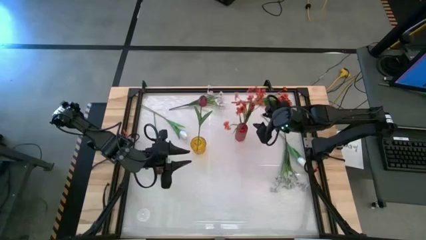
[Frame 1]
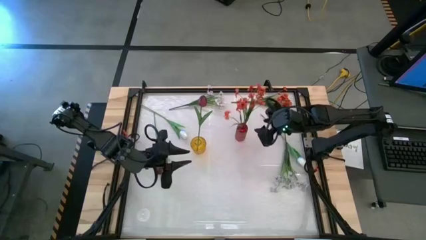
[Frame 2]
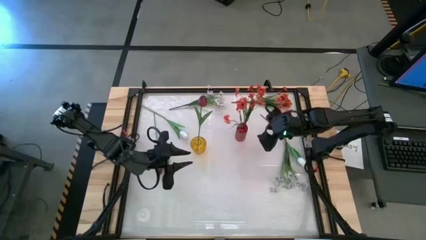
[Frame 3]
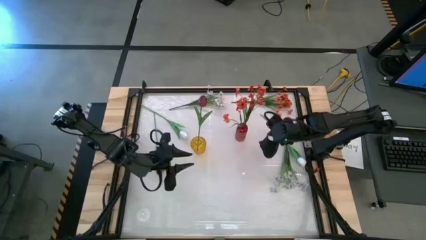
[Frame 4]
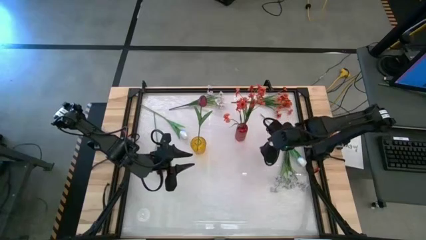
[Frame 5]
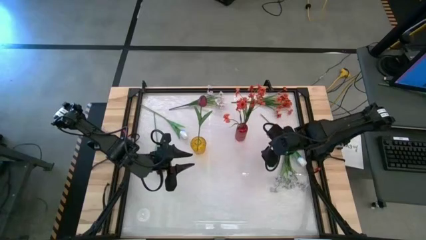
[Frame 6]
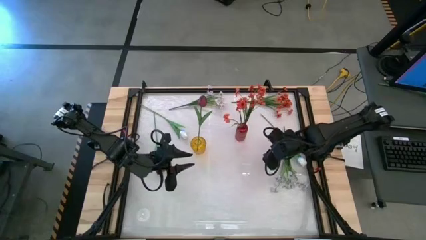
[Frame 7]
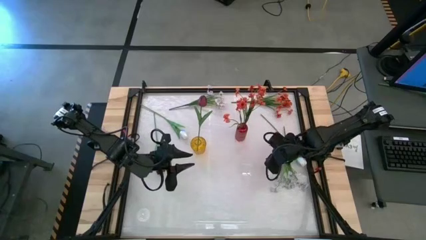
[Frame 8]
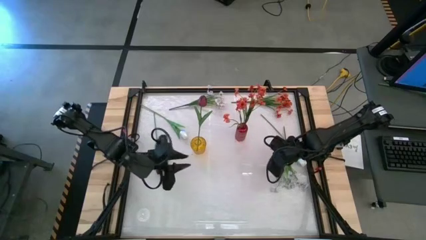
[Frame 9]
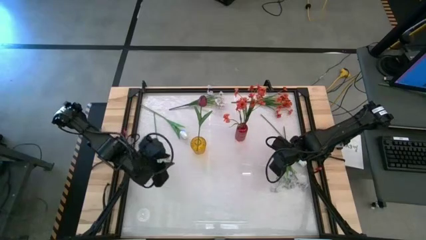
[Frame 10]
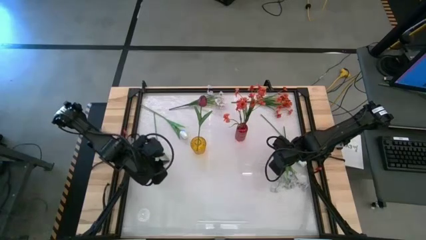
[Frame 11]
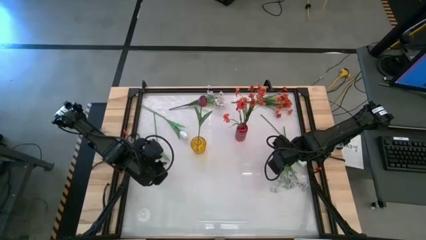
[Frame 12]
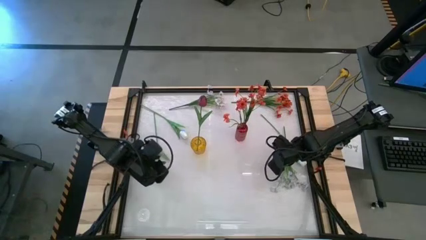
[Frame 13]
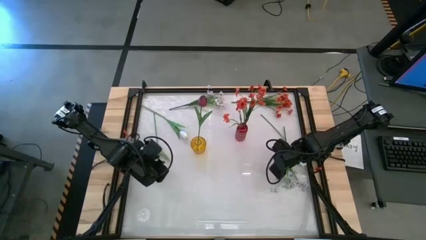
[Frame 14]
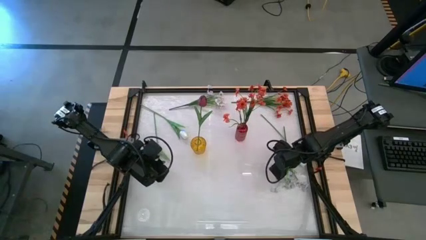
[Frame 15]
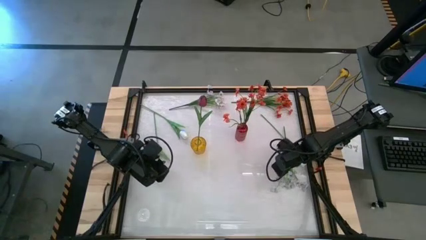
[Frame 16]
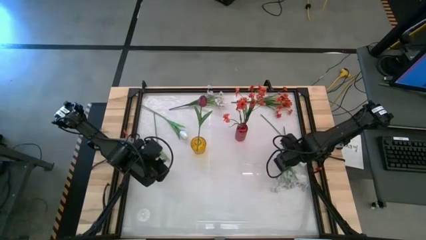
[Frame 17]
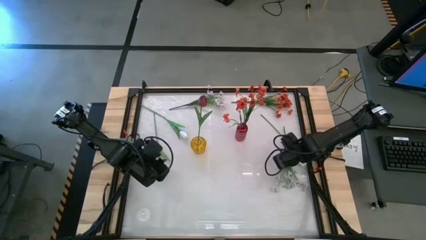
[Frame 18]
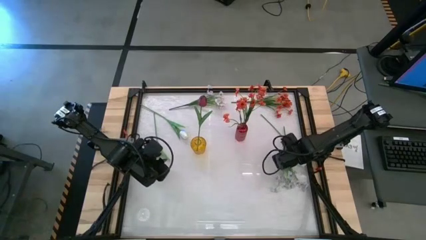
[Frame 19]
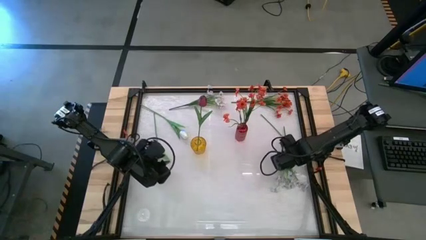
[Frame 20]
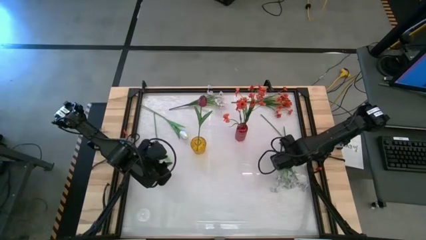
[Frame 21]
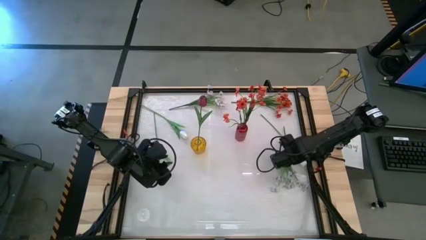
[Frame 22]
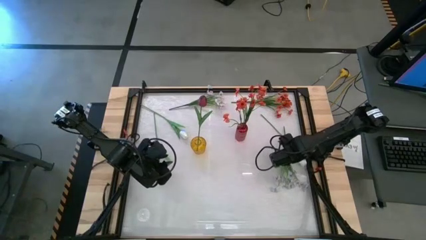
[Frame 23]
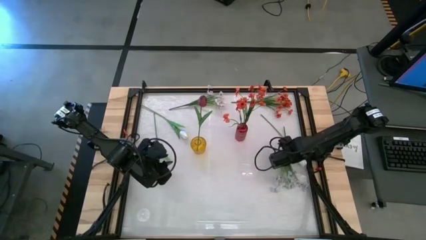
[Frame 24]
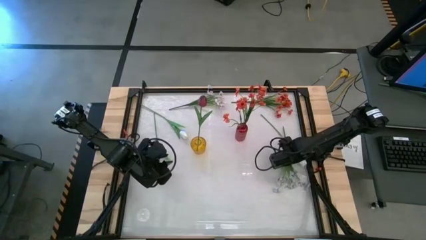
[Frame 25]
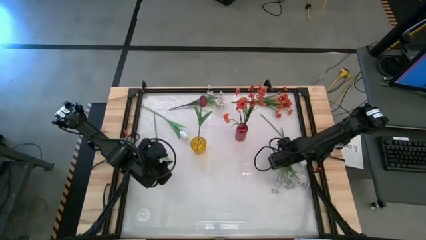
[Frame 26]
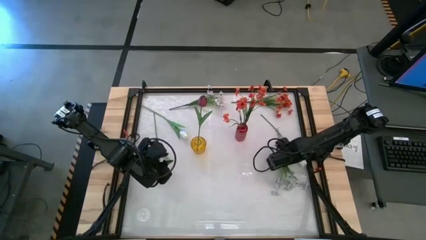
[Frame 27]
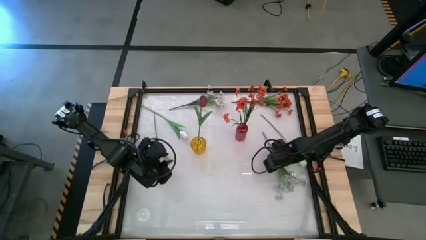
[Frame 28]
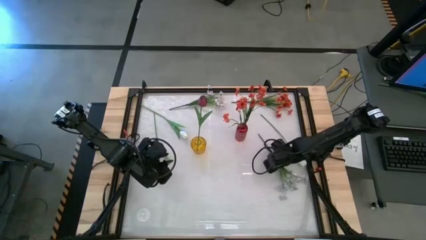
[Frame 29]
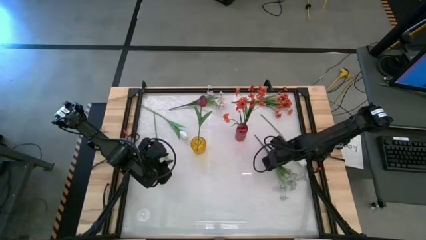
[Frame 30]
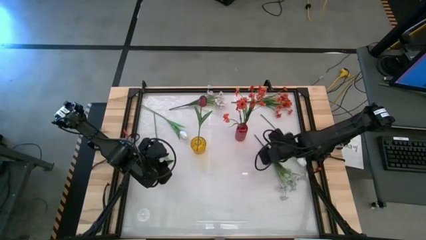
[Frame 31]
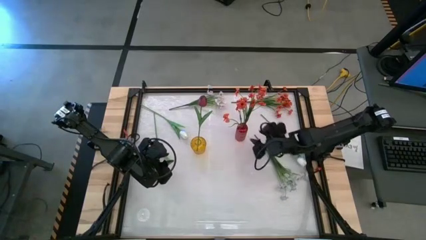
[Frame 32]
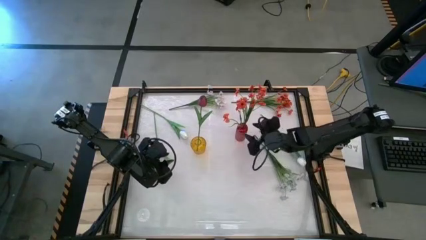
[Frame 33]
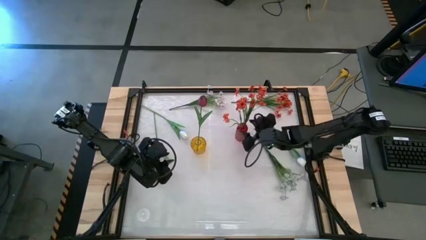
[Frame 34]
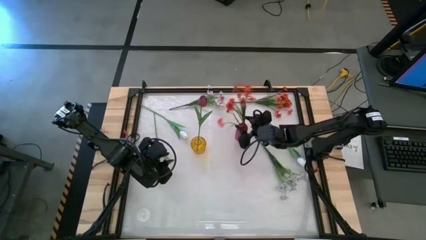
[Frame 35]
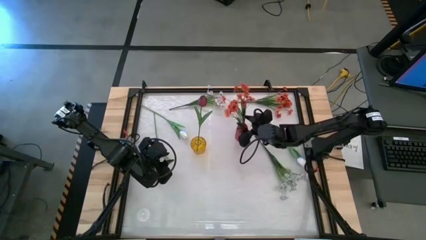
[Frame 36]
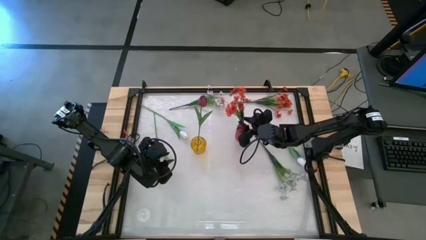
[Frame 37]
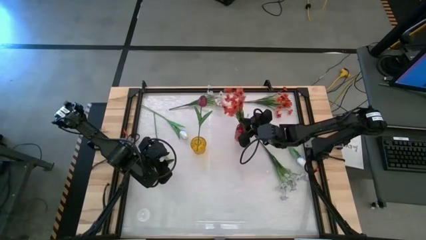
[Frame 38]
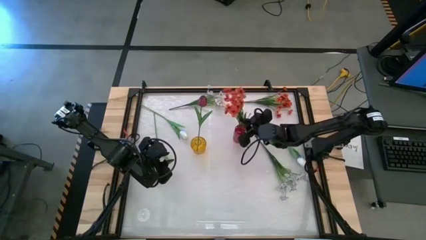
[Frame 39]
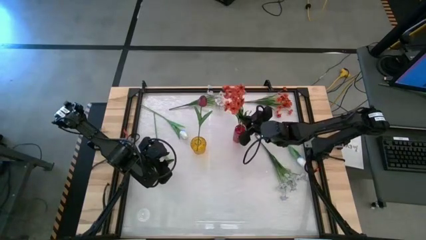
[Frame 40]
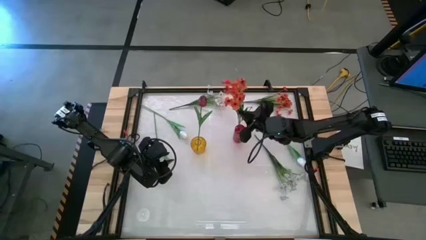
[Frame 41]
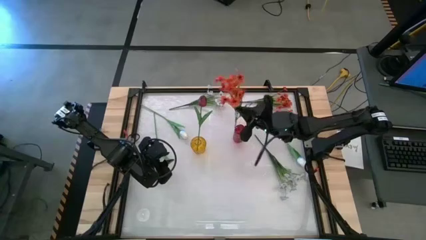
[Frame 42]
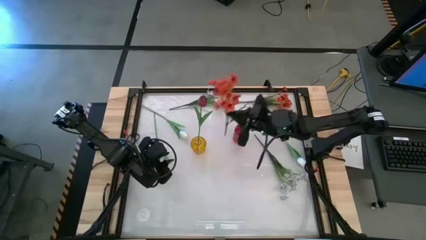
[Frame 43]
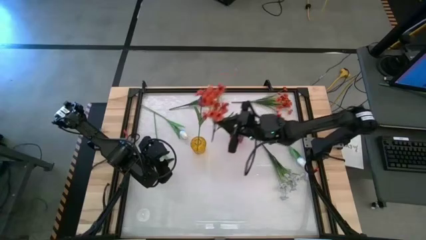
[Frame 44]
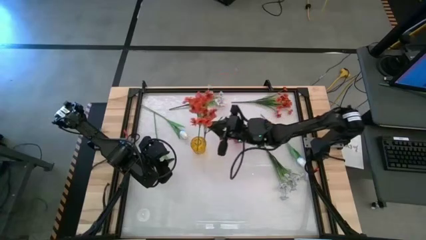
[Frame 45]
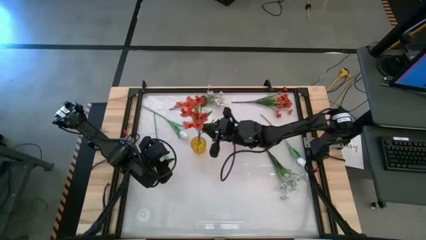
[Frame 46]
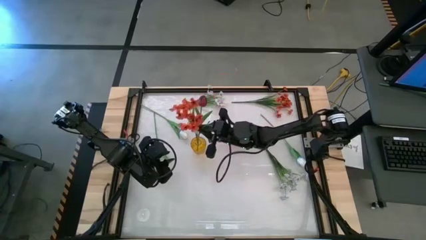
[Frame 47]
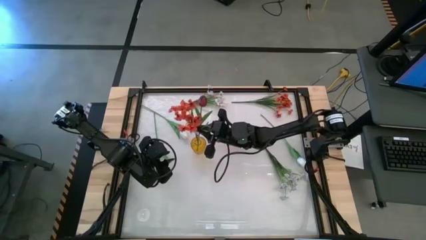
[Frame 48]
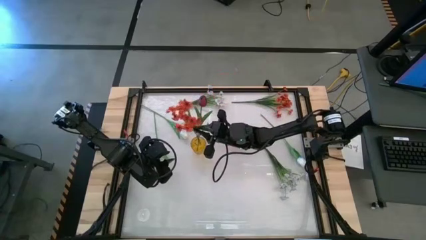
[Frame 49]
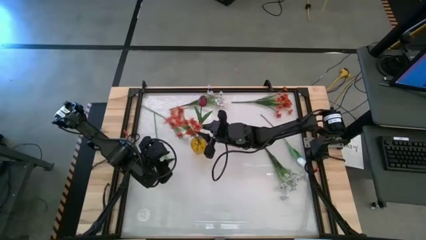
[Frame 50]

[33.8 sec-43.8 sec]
Task: Sort flowers into vase by color
Put the left orange flowers into the yellow flower vase

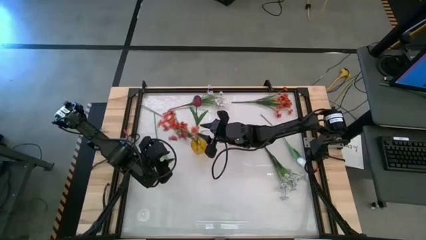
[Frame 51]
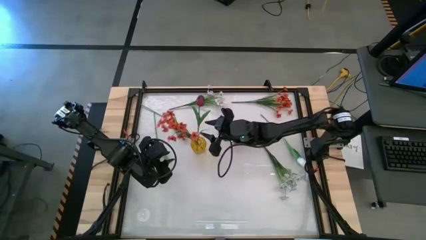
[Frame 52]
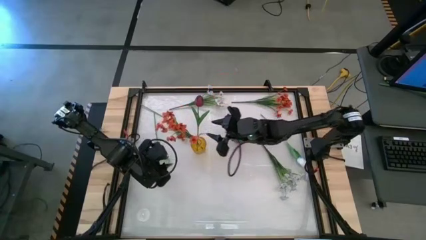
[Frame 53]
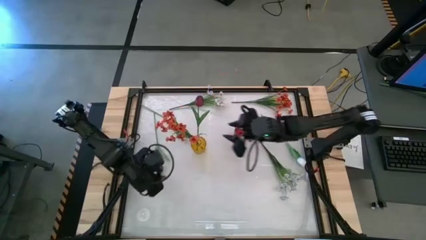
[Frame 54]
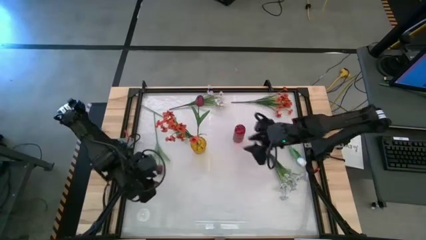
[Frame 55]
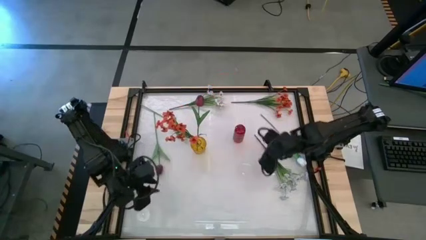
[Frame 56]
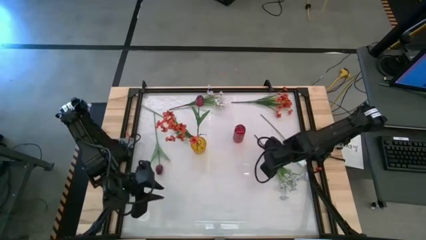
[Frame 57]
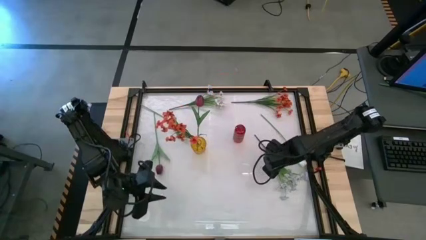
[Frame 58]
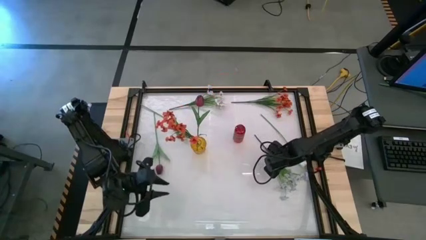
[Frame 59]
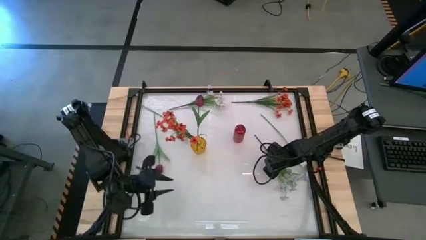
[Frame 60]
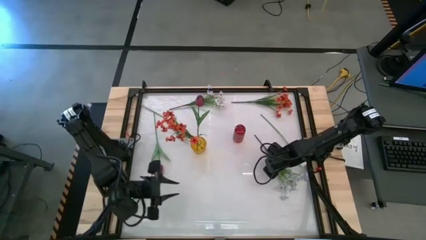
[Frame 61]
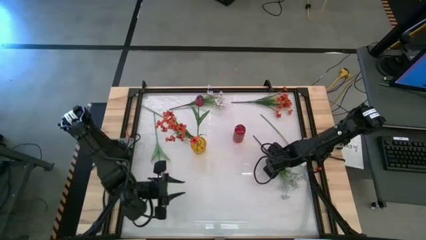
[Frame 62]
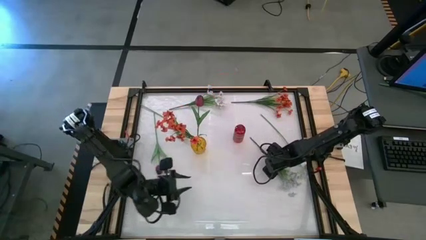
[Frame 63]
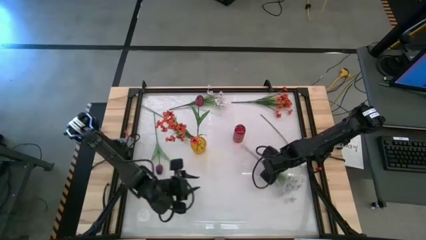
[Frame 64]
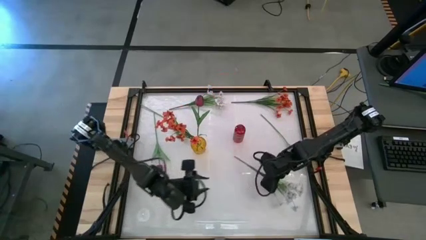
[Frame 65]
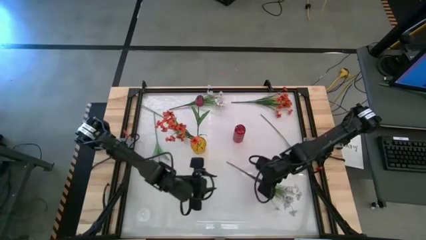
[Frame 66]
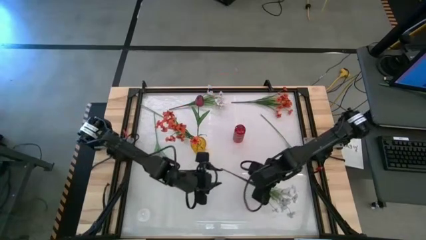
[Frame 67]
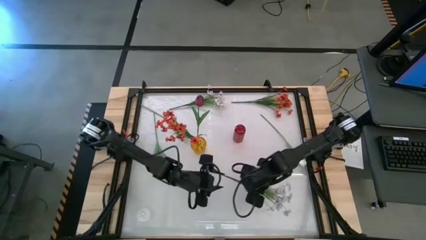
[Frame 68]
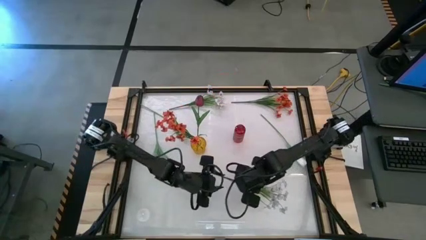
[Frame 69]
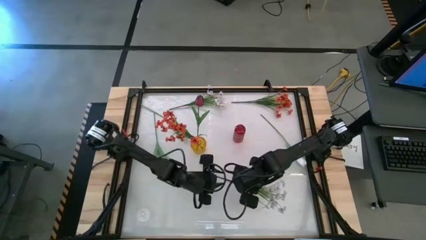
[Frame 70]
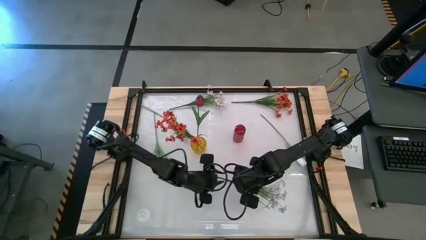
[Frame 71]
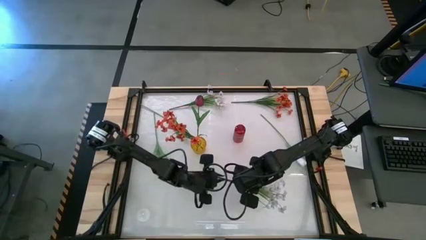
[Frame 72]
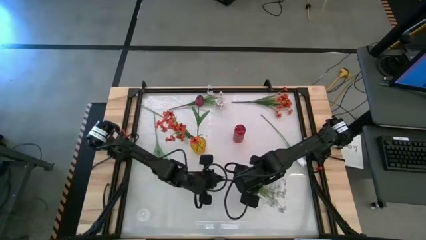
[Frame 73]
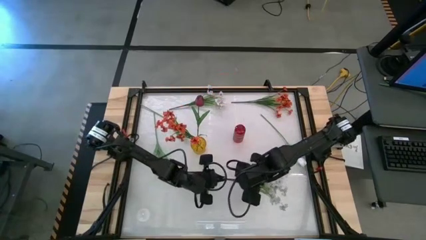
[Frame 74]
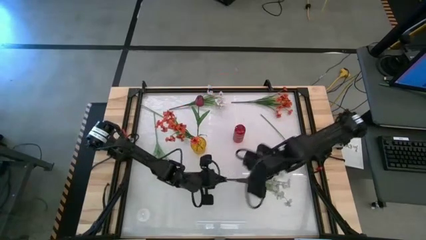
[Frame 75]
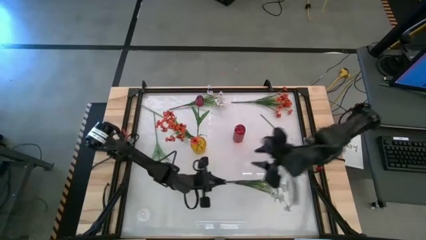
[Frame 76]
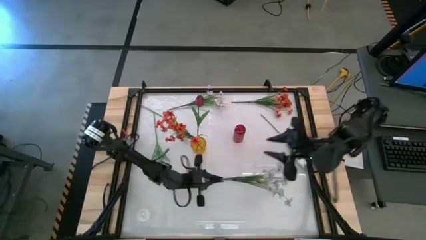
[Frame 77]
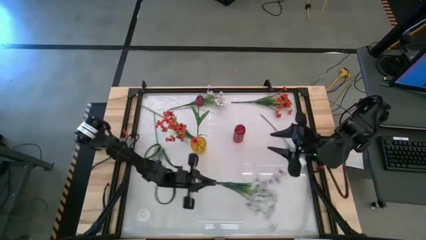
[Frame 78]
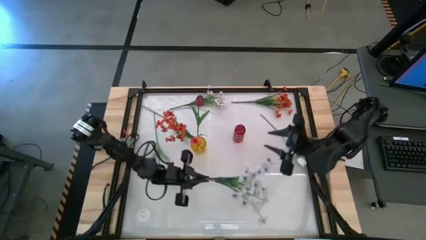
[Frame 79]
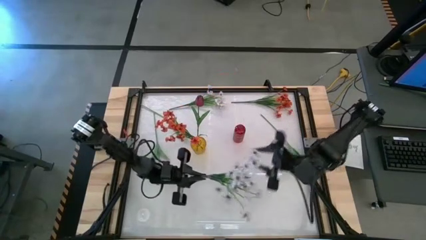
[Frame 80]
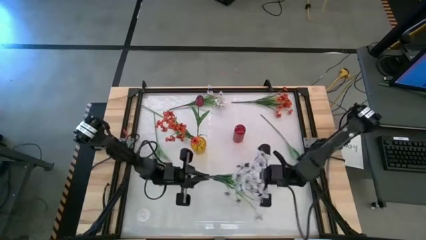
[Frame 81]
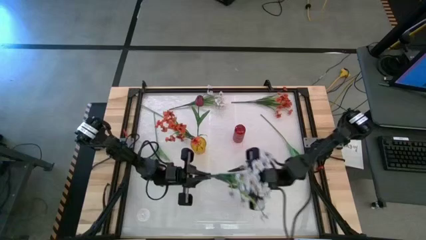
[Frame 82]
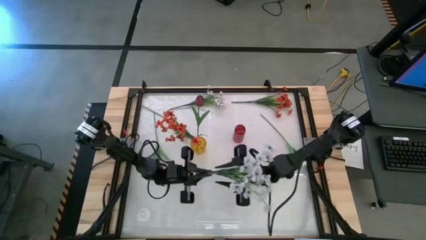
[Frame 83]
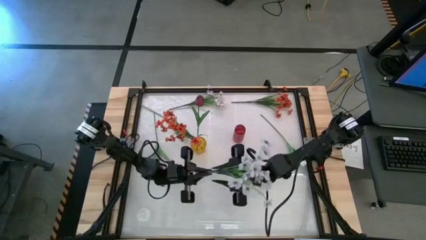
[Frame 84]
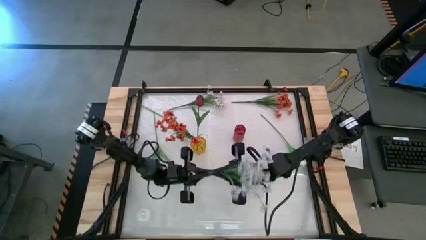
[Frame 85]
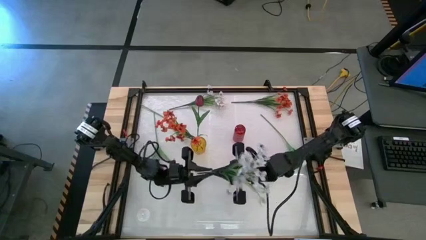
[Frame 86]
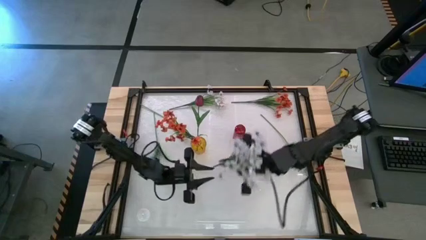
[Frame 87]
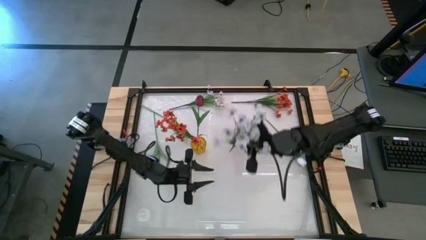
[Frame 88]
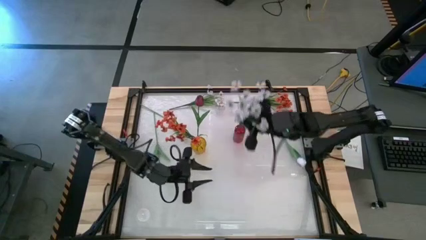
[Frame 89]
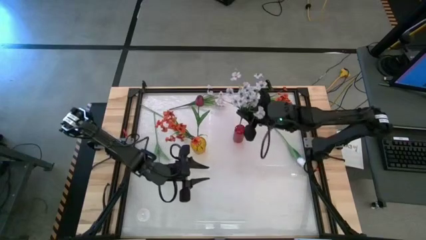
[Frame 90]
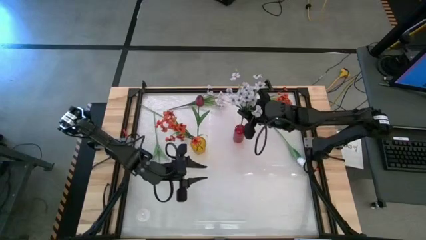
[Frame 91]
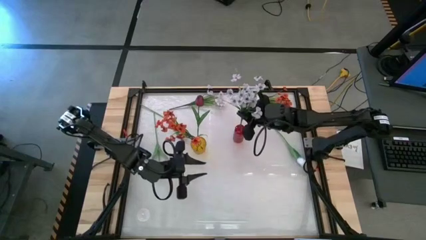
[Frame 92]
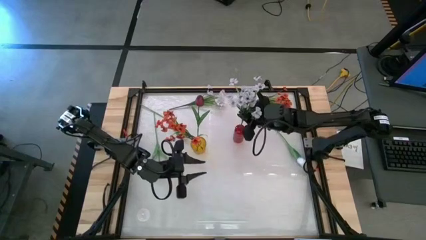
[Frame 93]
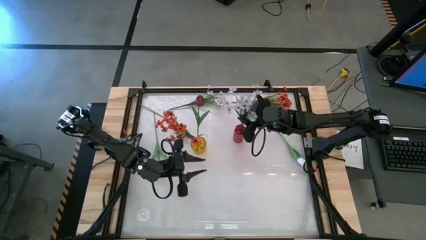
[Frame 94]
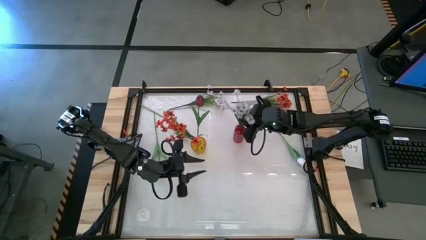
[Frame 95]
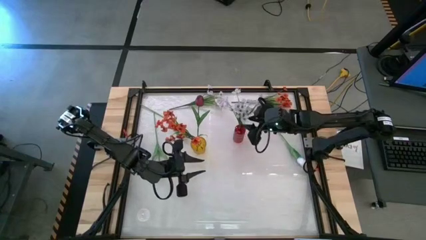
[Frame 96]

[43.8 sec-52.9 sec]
Put the left white flowers into the red flower vase
